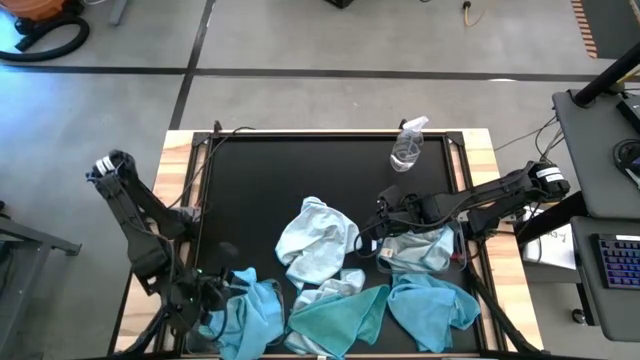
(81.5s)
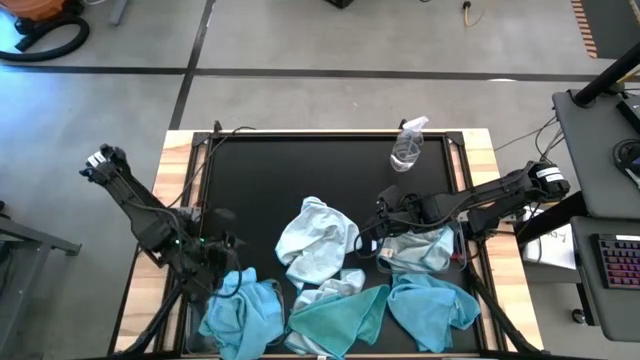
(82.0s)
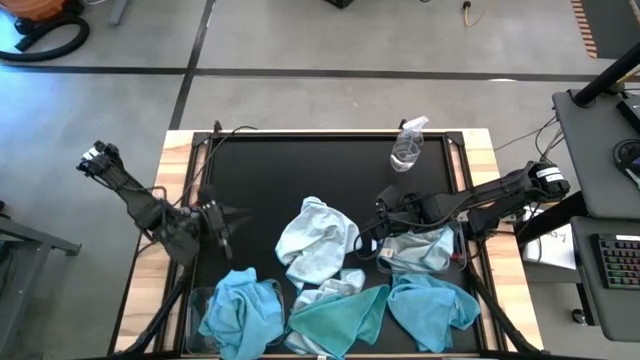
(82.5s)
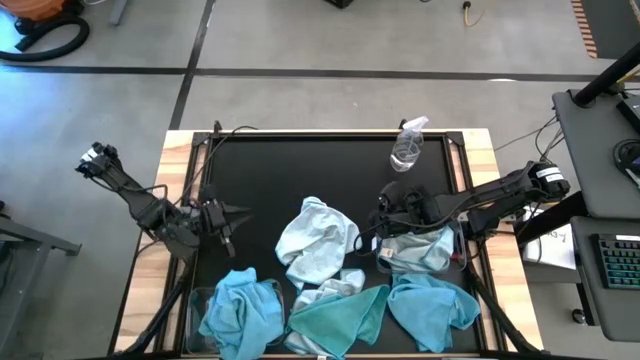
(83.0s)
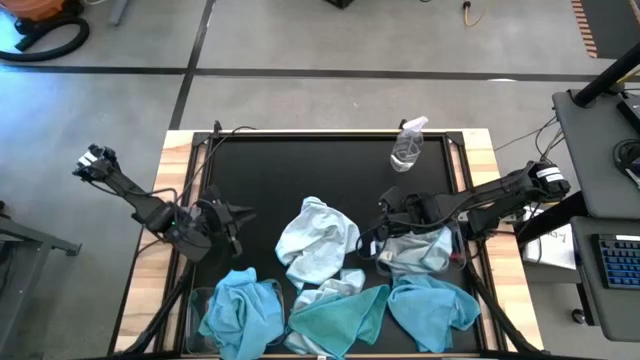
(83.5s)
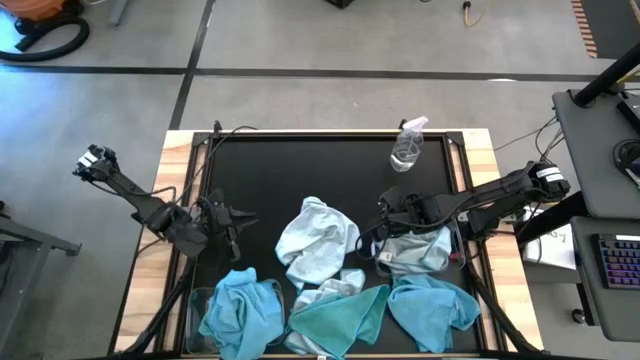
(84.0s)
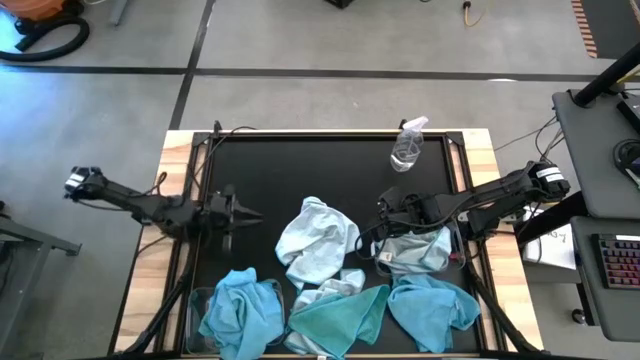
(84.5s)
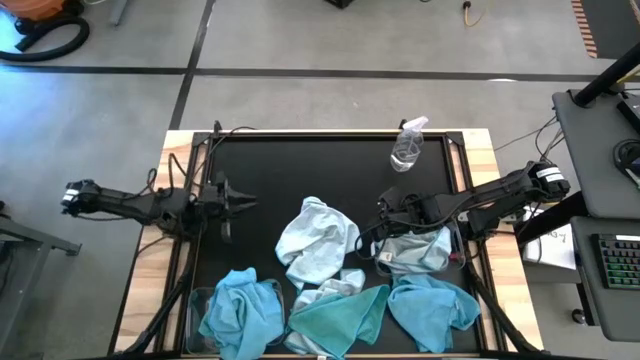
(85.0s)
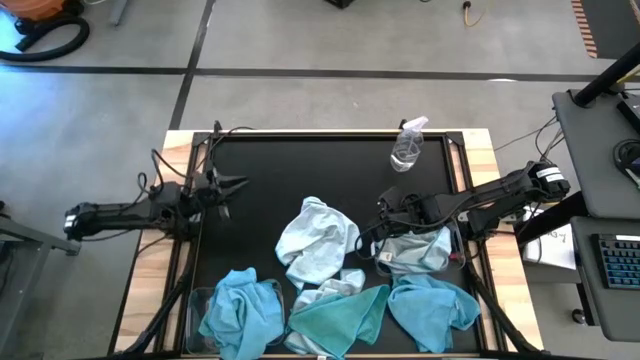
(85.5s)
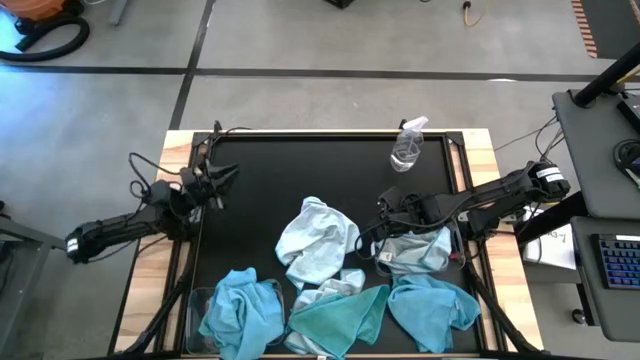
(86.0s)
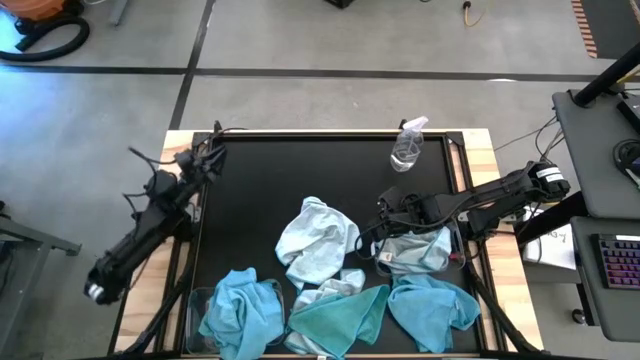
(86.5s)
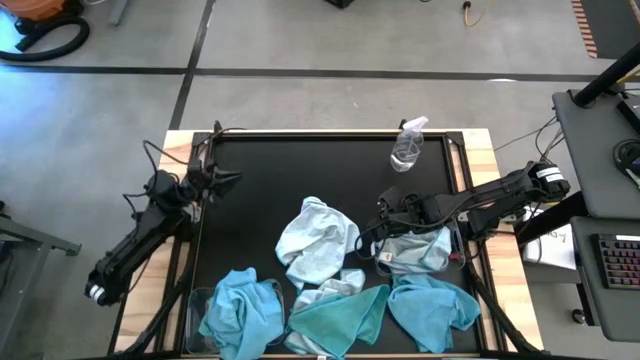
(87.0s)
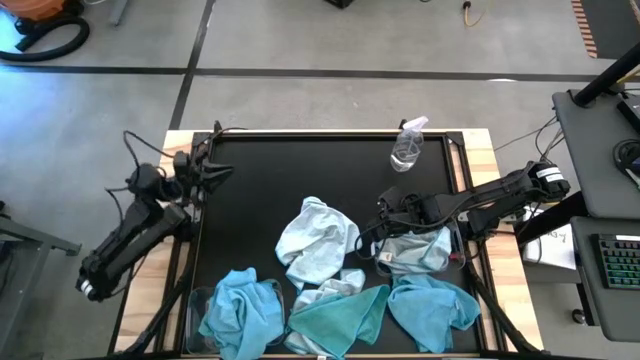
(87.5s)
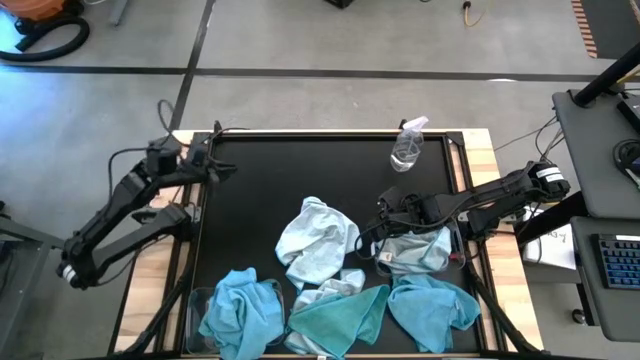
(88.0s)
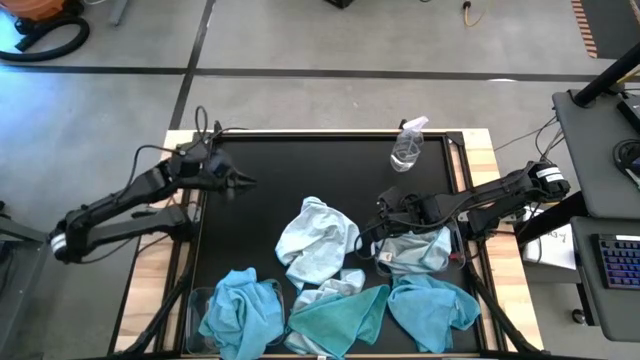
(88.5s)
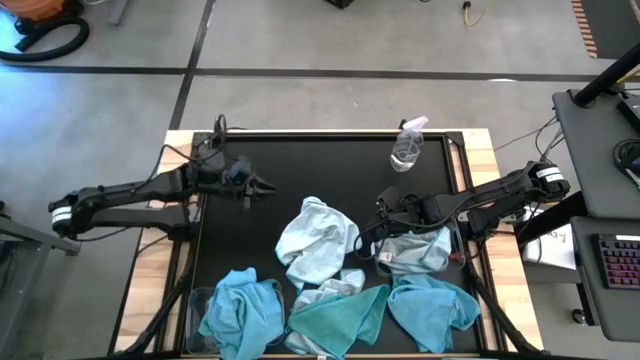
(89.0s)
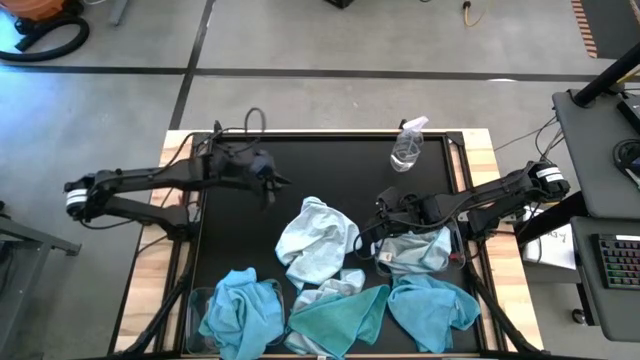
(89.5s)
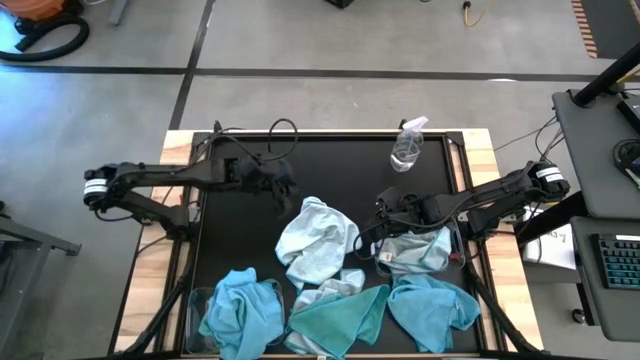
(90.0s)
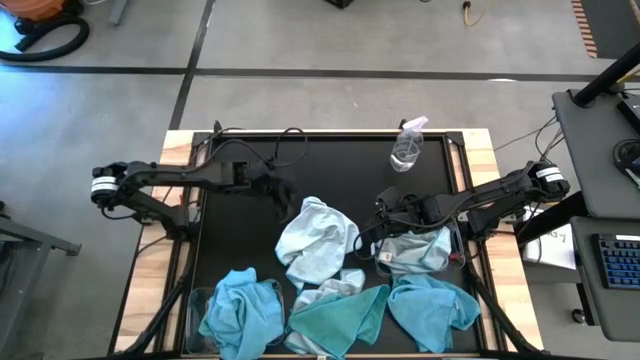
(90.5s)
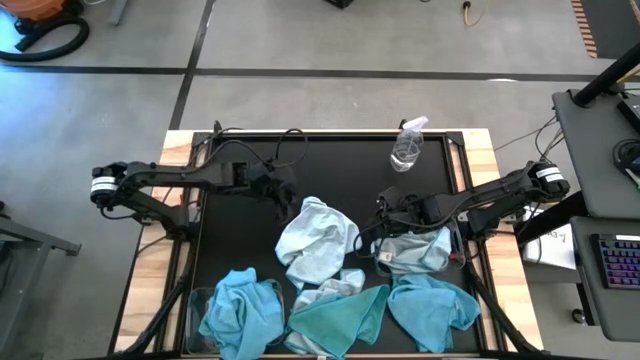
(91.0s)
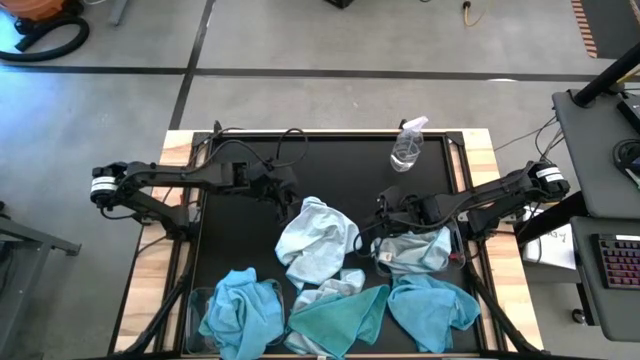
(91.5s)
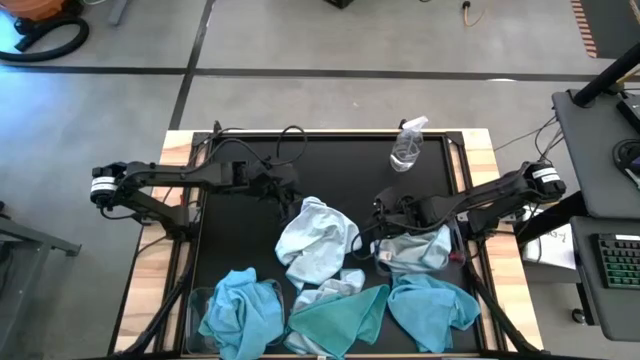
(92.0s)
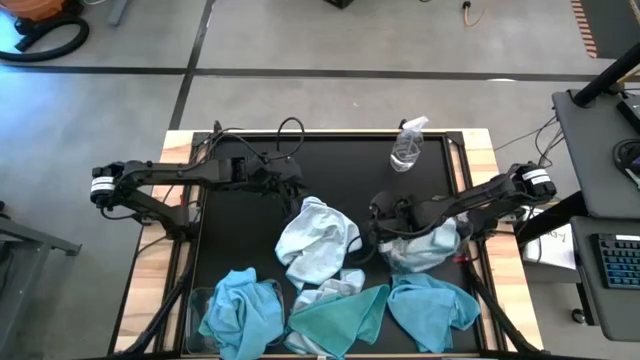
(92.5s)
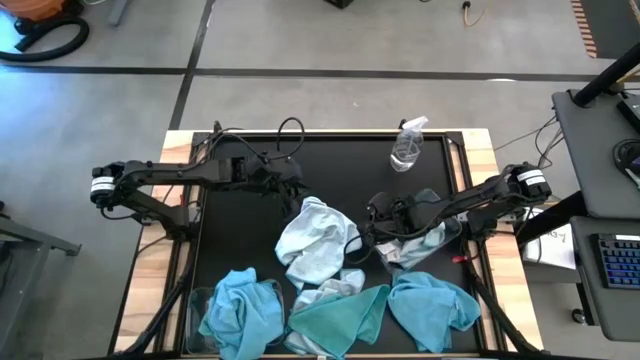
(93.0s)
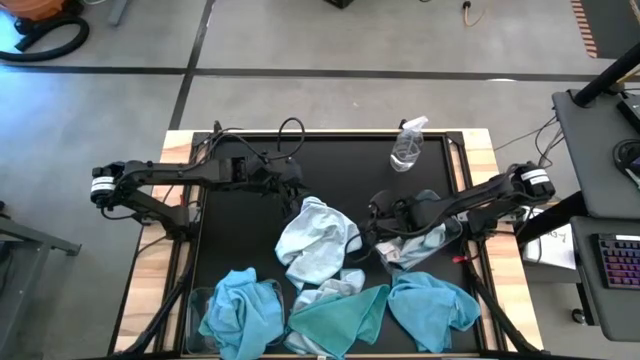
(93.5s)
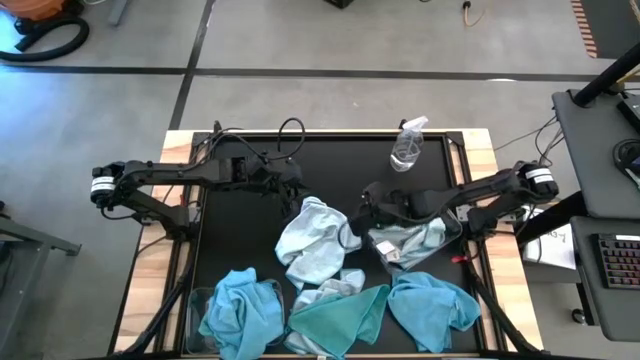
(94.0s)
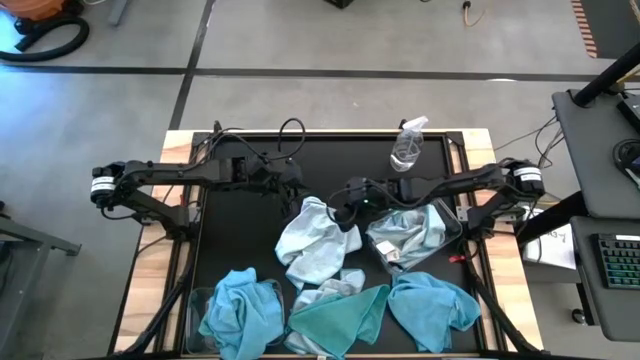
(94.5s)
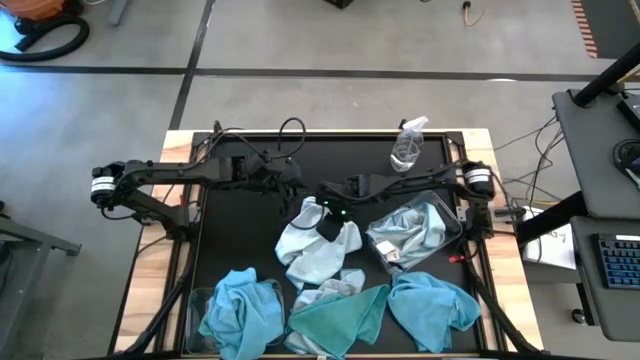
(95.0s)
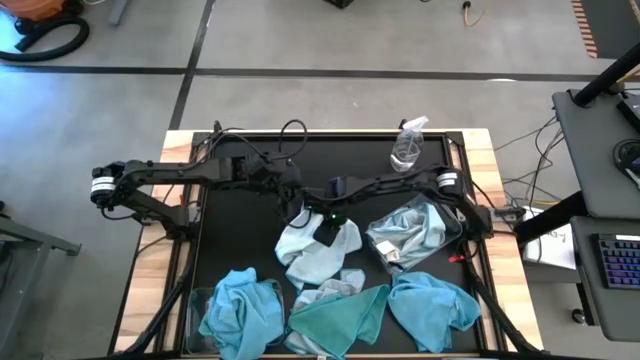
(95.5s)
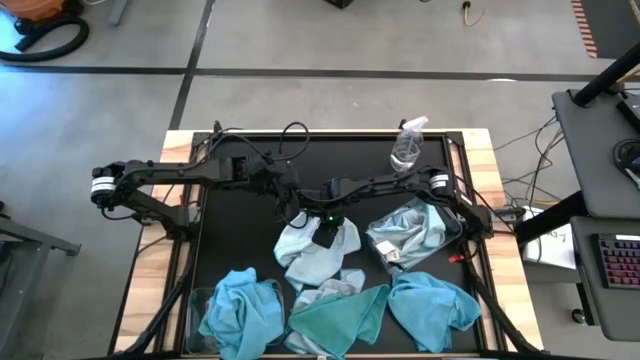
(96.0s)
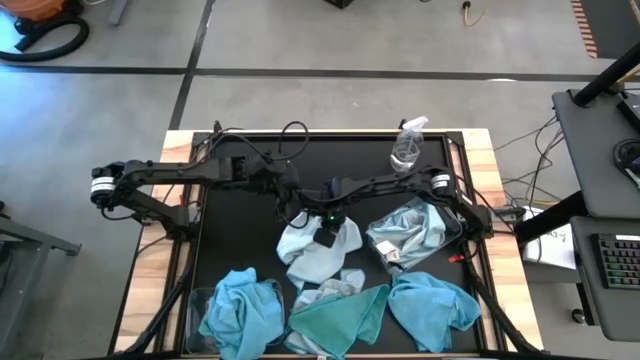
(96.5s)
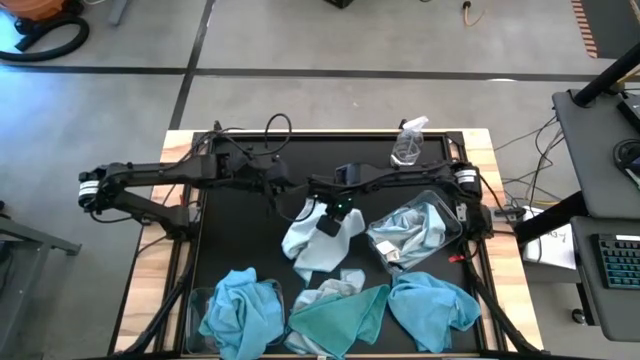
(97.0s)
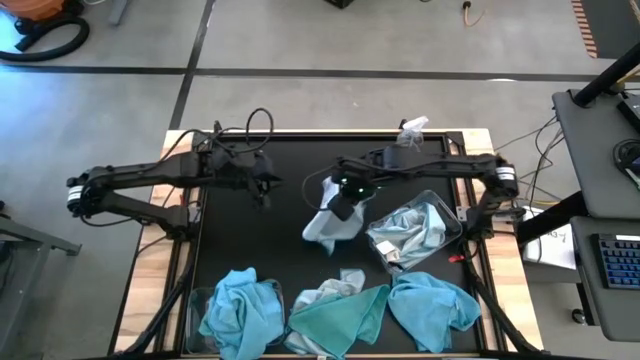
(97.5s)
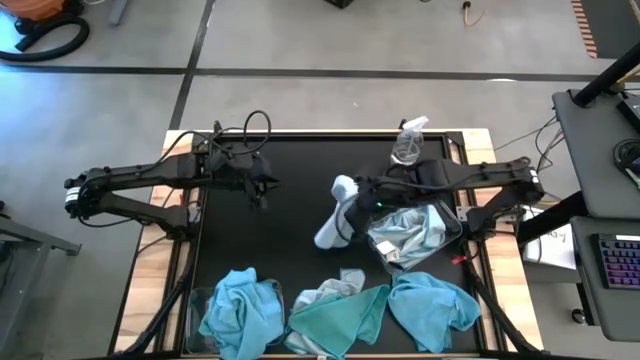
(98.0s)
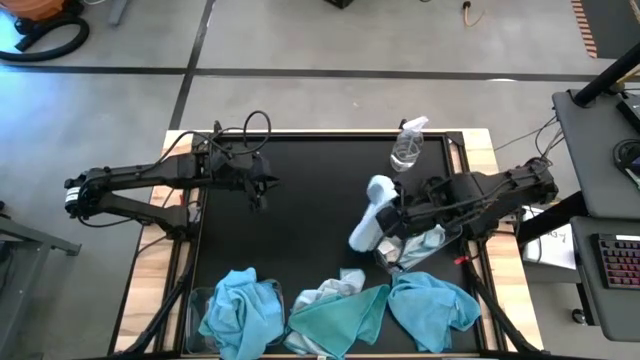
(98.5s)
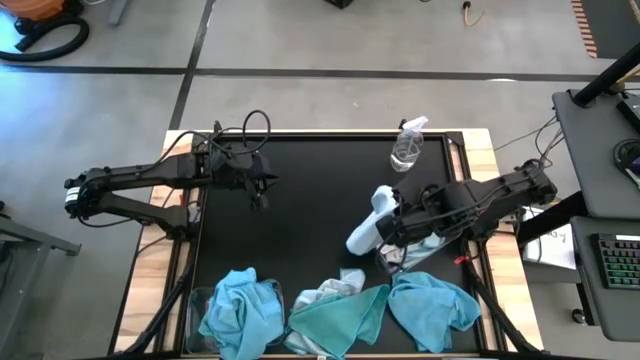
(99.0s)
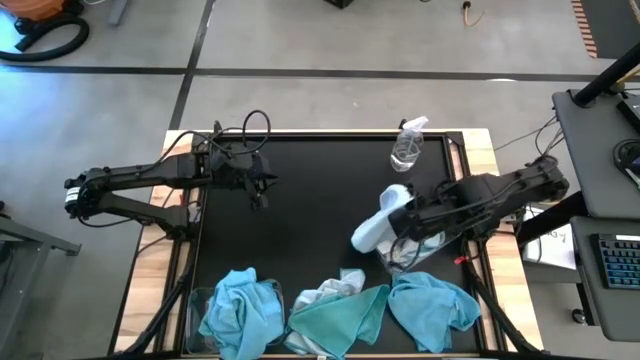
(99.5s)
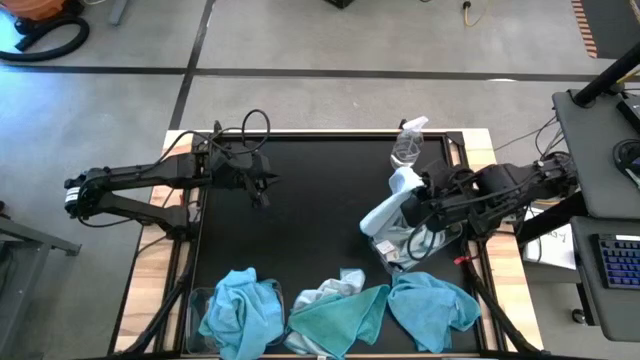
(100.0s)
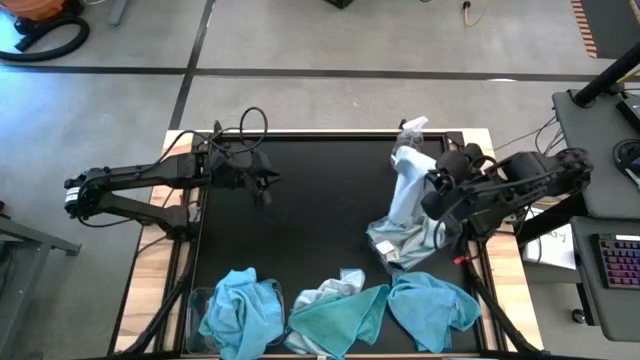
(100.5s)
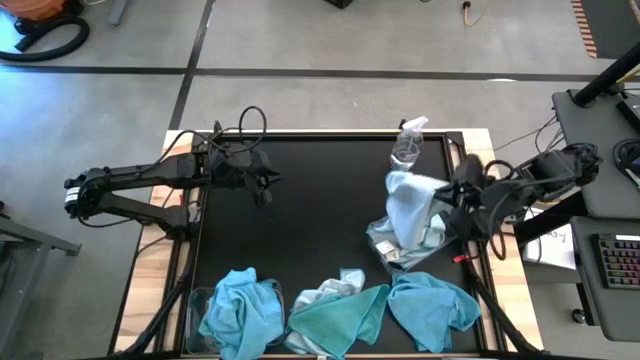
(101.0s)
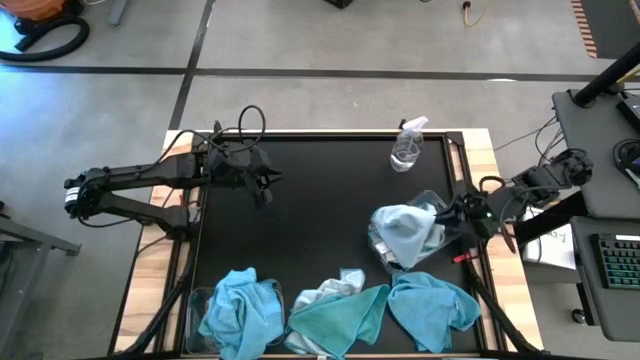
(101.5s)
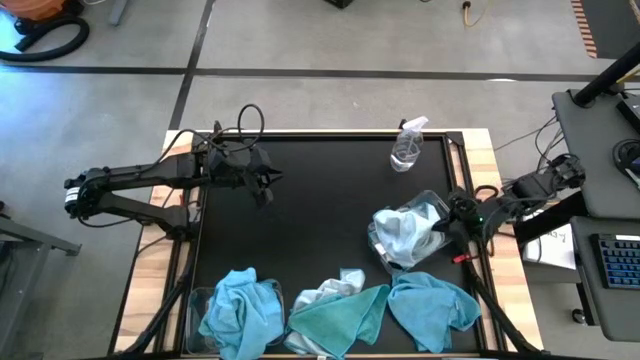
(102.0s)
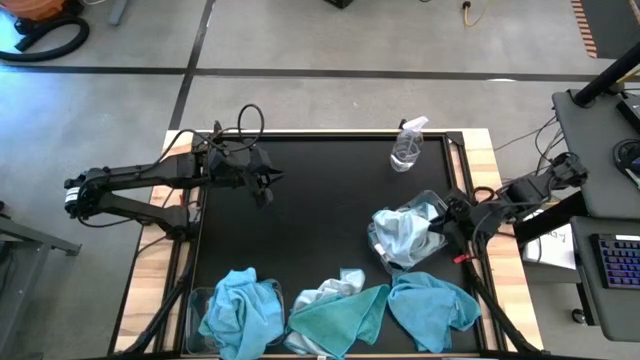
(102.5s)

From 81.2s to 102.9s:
Task: Sort microfiber towel by color & place in baskets
Put the white towel into the top transparent bin
